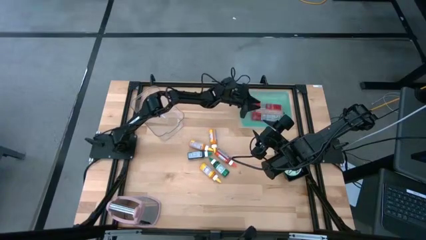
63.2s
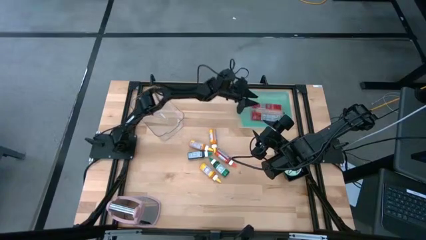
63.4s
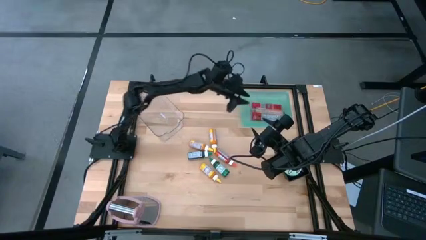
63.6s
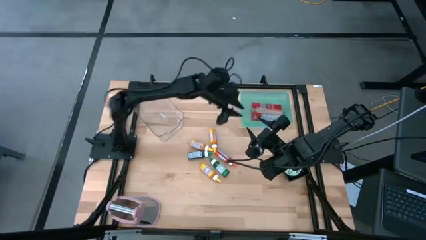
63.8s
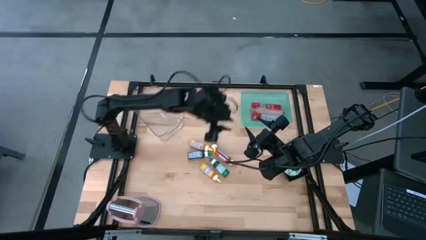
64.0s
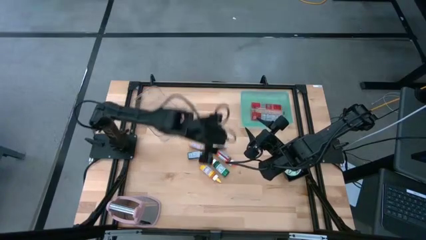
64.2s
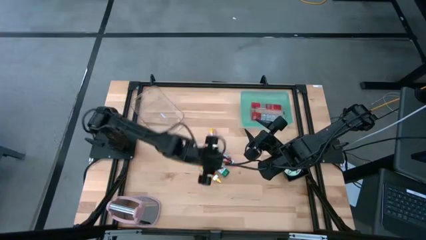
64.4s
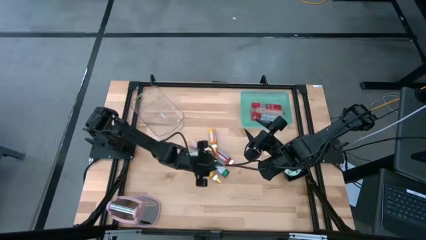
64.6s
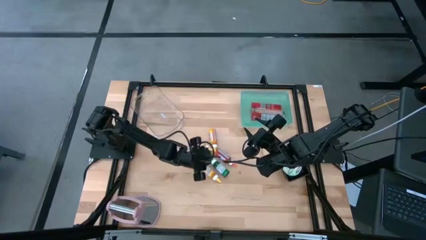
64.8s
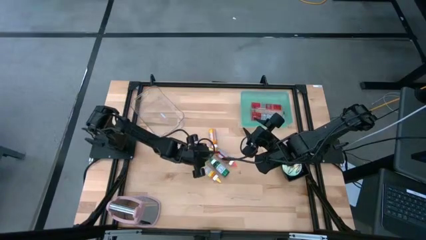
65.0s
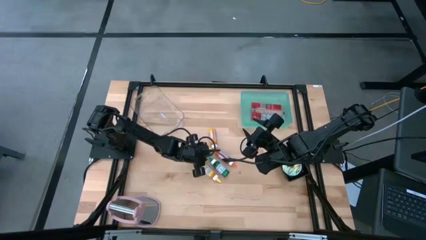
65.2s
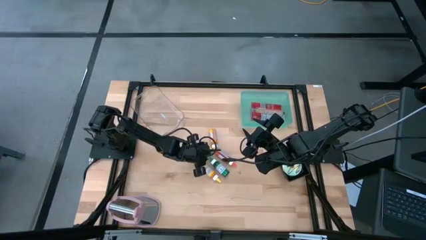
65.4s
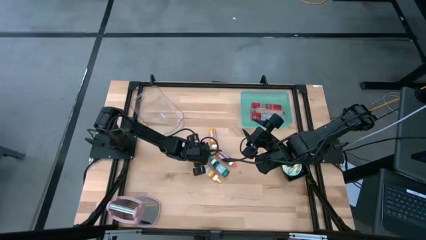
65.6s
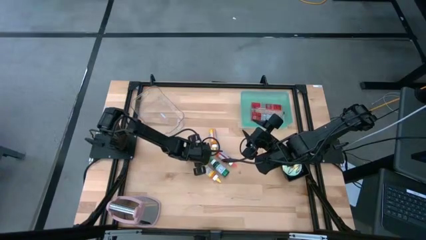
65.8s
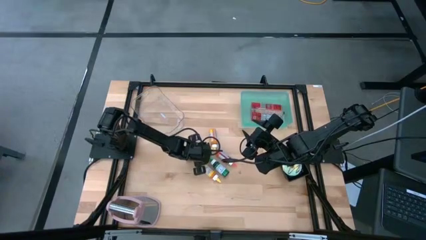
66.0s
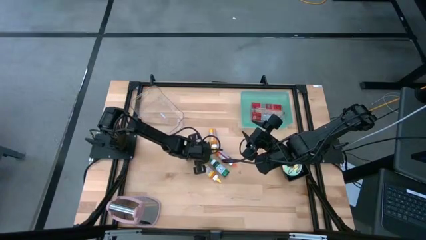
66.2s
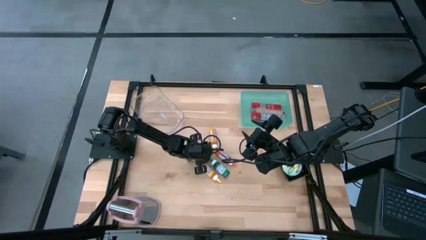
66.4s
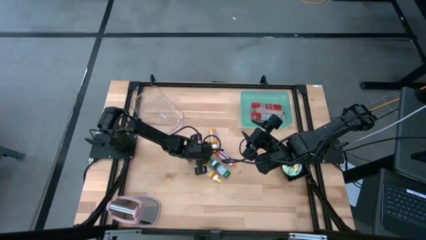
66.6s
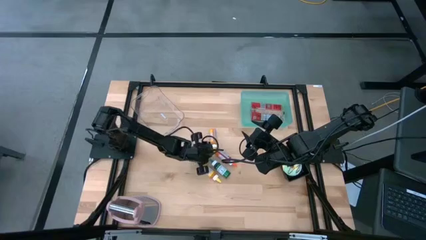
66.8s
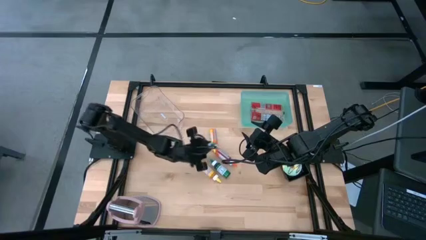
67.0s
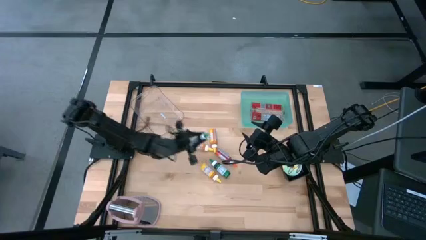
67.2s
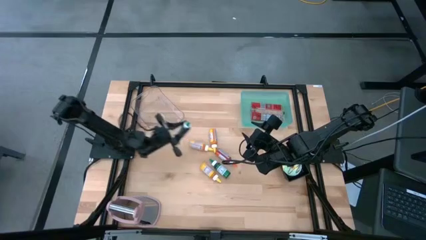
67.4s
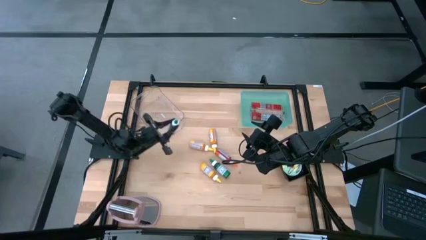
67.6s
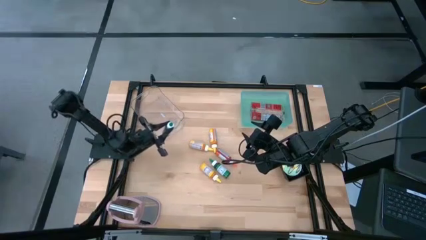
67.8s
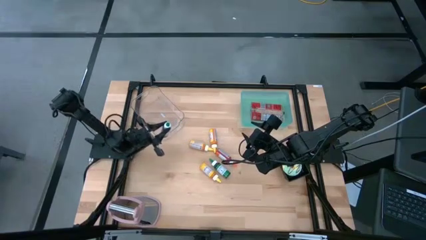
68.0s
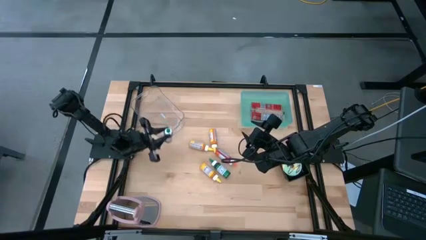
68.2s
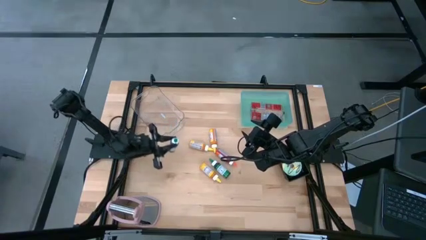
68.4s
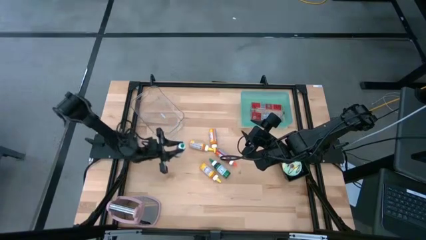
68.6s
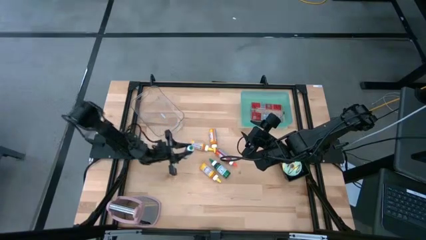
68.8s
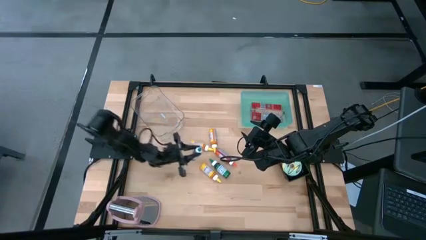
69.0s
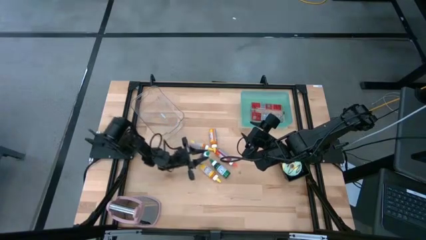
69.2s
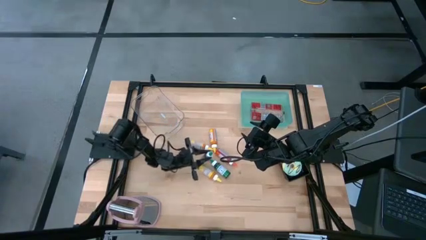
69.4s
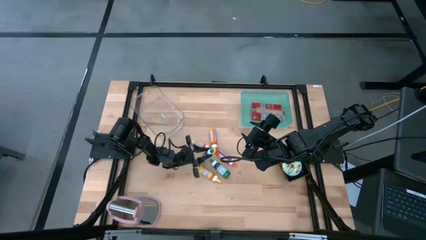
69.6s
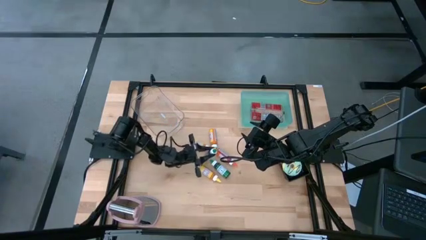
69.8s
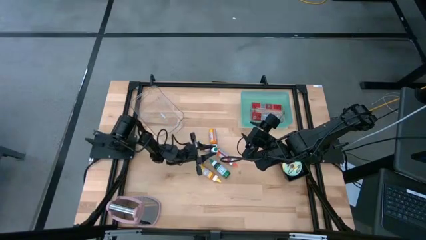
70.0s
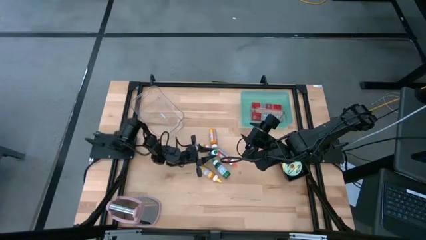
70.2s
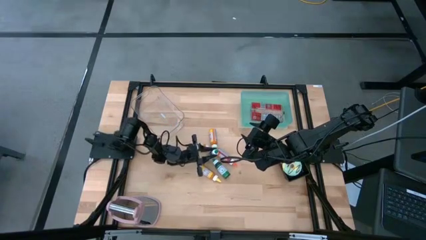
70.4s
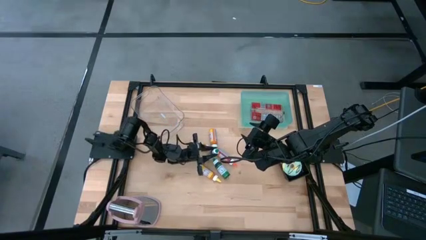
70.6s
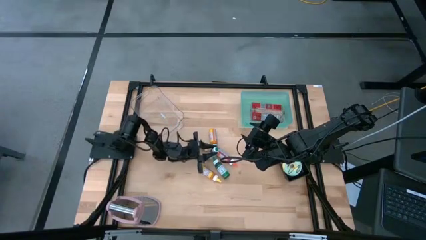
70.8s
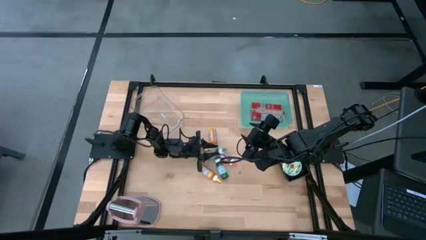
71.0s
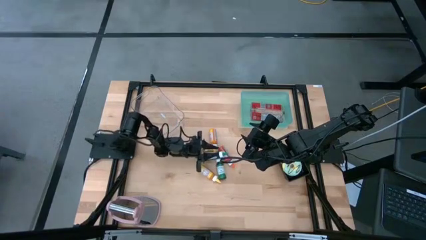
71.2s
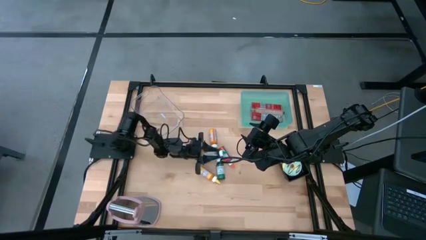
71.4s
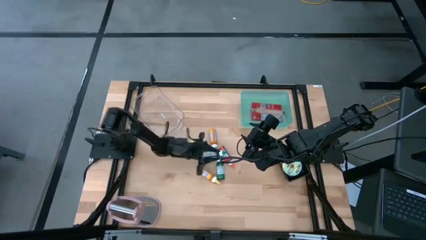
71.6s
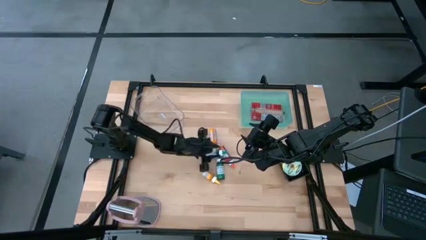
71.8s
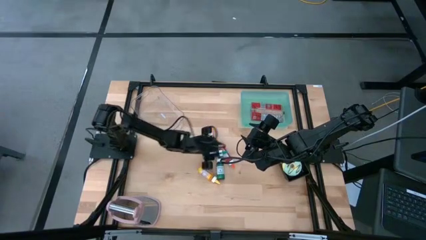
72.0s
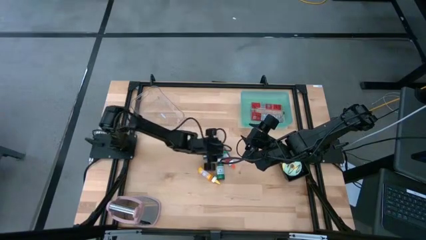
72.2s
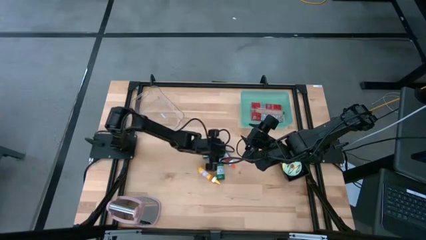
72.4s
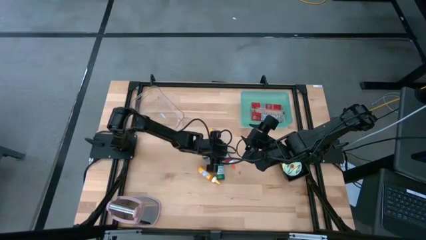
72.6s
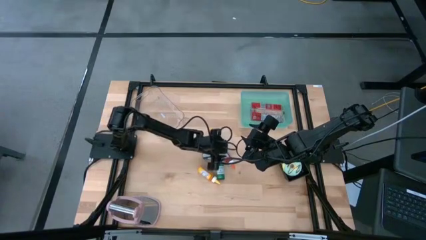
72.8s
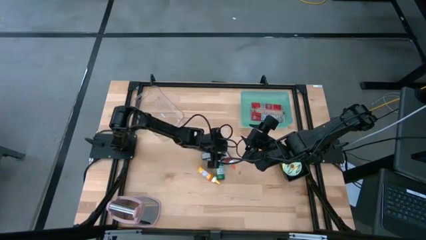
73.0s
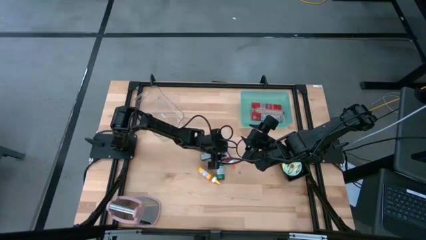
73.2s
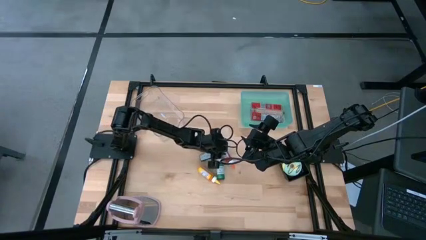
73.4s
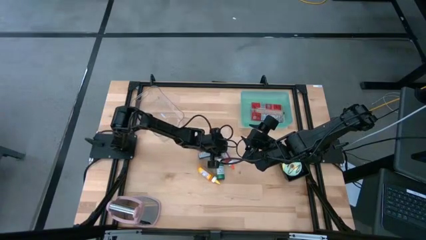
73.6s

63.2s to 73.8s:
Put the left green food coloring bottle into the transparent bin

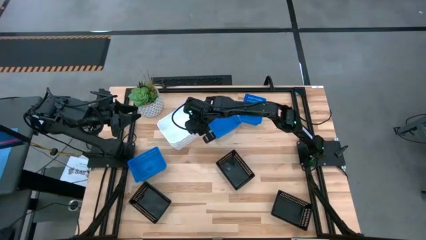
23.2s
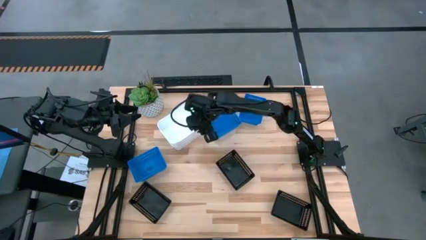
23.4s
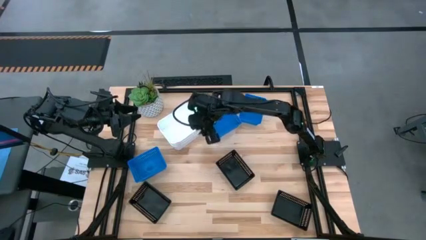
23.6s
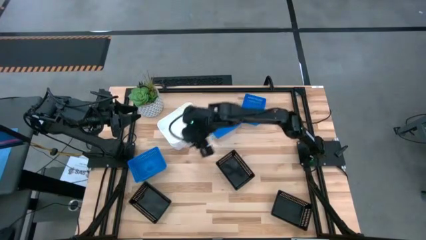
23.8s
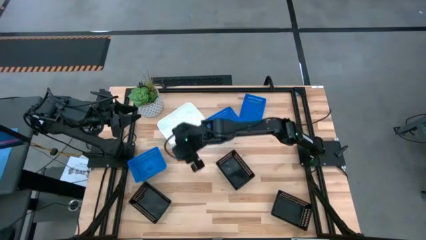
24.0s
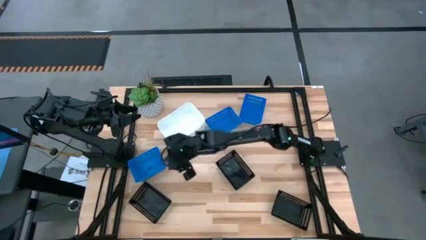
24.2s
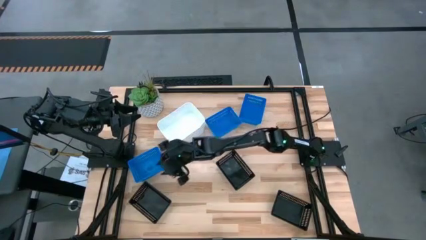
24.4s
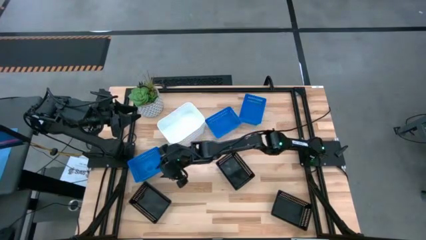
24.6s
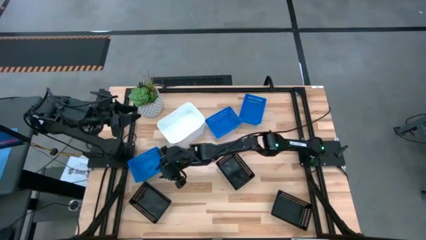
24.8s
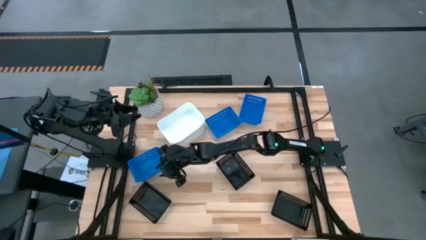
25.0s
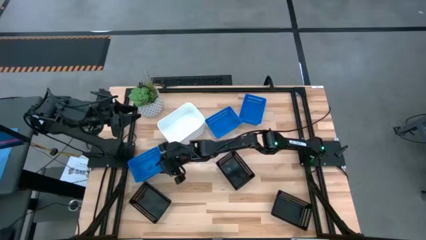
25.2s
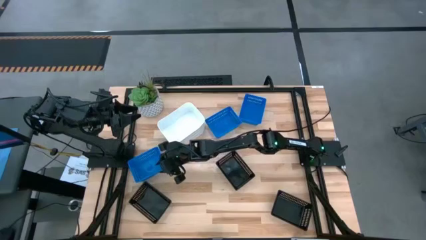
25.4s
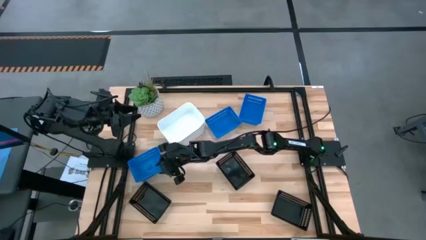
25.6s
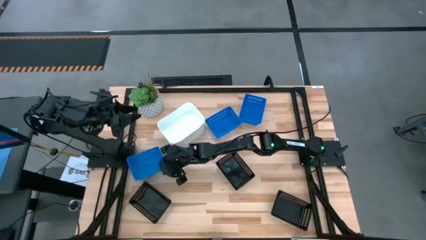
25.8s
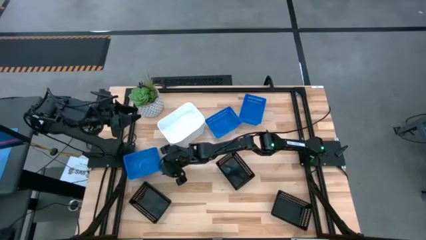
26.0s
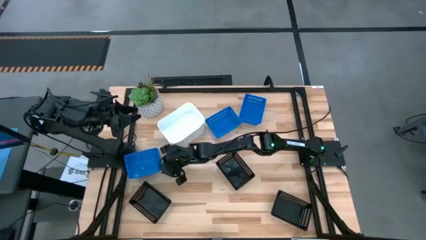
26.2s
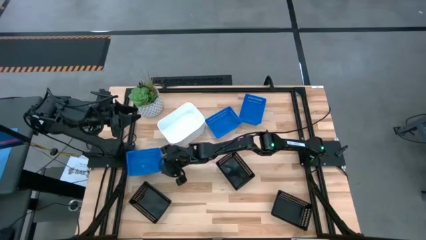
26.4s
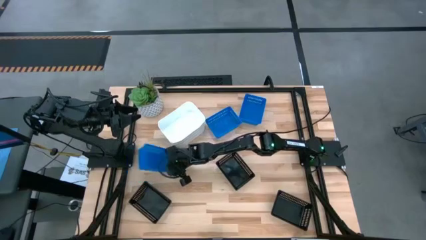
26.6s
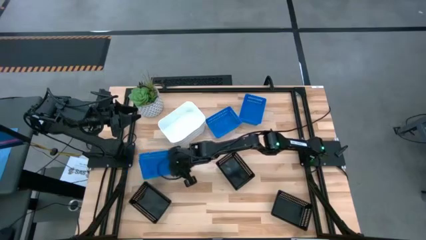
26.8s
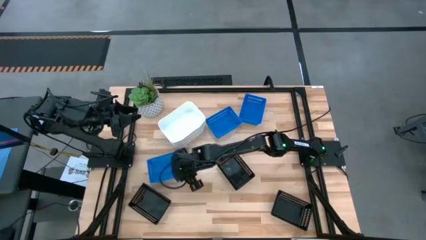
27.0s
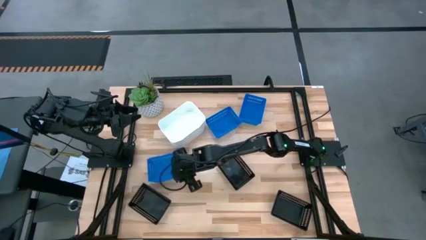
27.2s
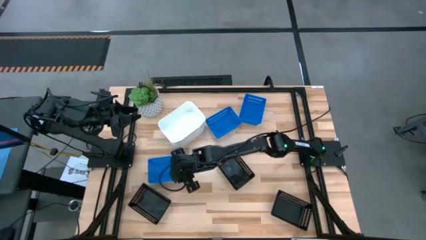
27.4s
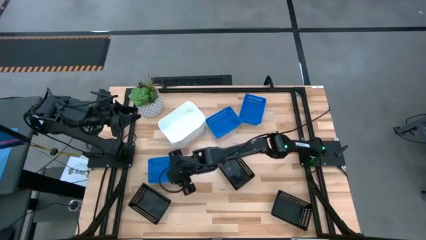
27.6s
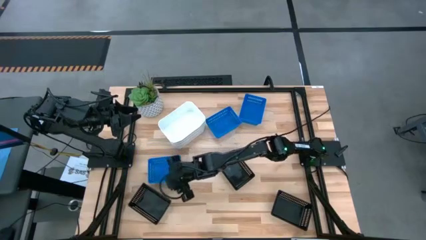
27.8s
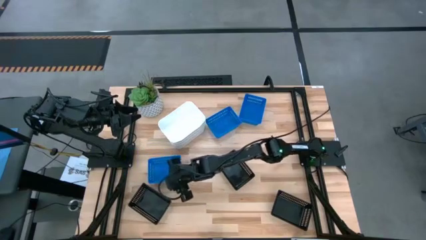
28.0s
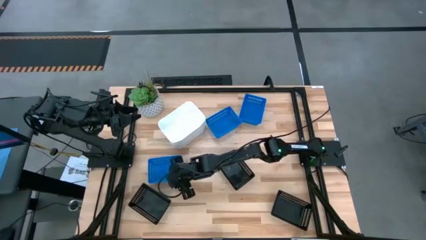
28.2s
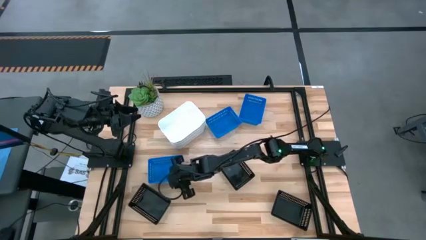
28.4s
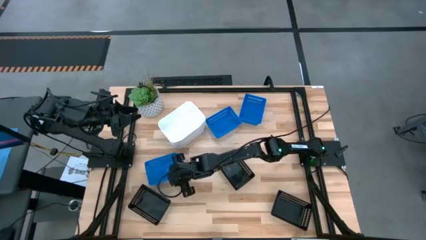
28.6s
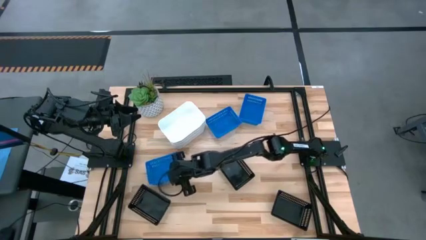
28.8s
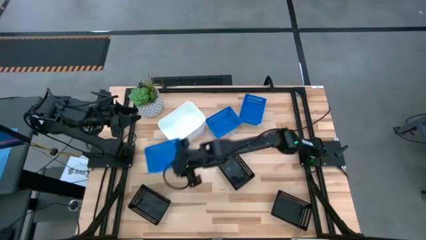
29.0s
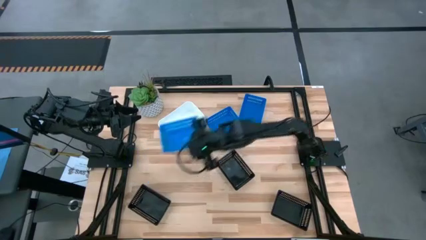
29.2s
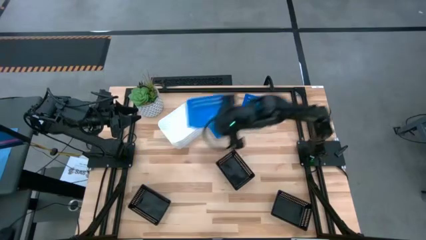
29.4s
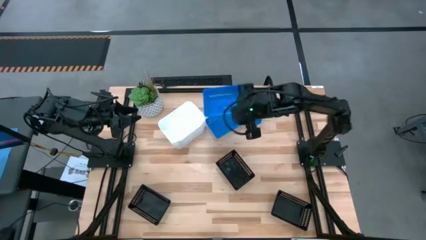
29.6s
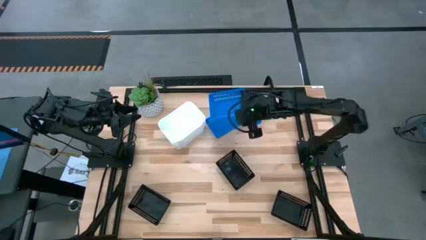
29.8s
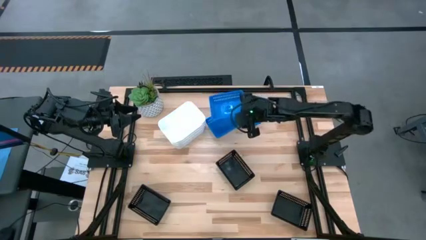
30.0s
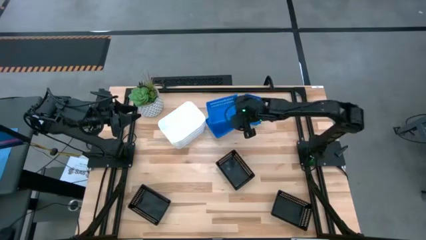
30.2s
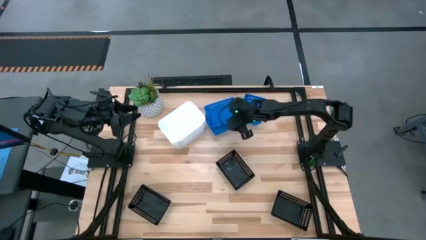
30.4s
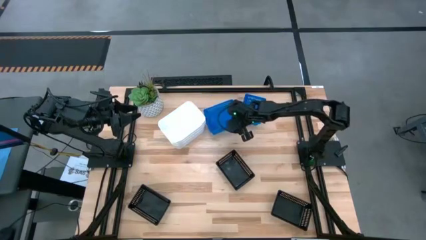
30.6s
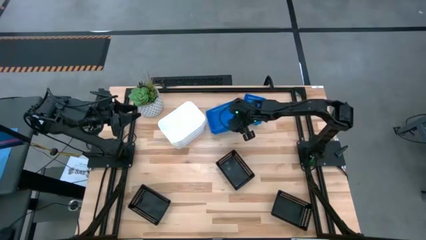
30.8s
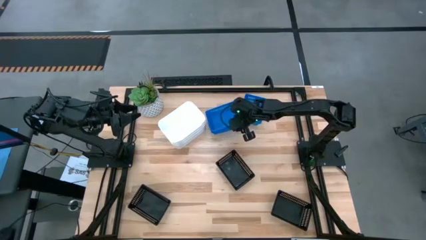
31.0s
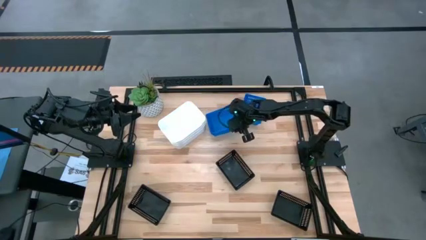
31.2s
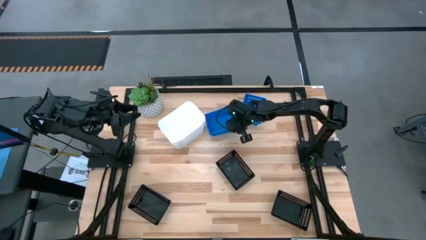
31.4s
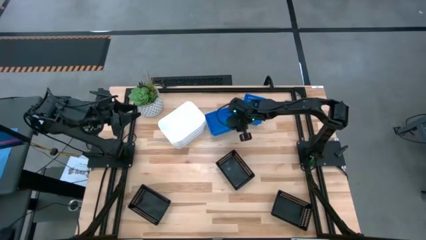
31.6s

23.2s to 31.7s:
Stack the bottom blue bin on the top left blue bin
